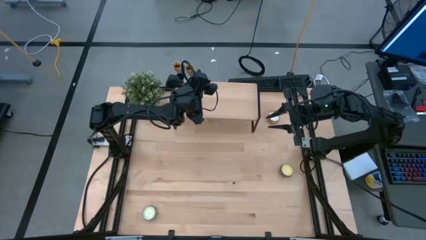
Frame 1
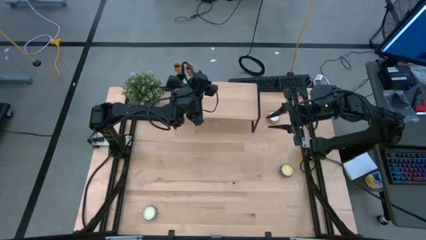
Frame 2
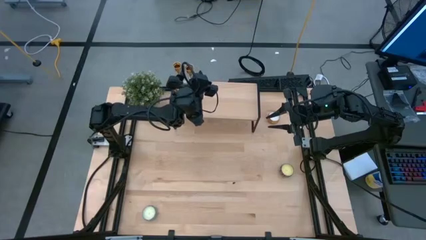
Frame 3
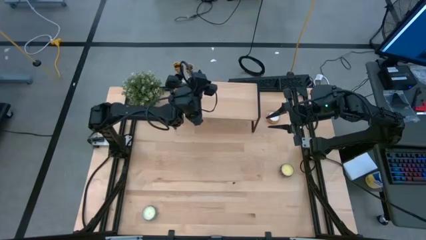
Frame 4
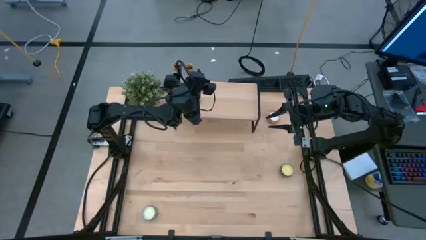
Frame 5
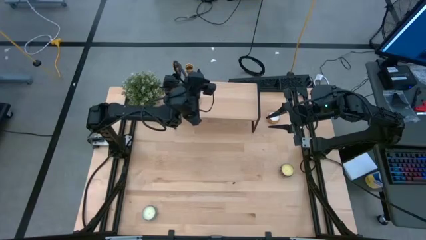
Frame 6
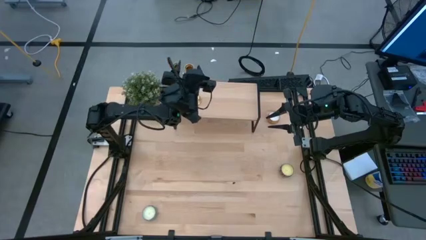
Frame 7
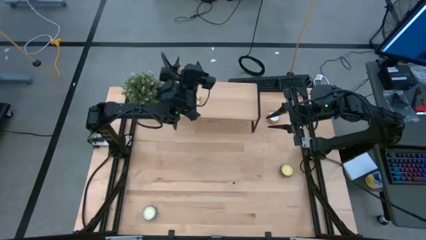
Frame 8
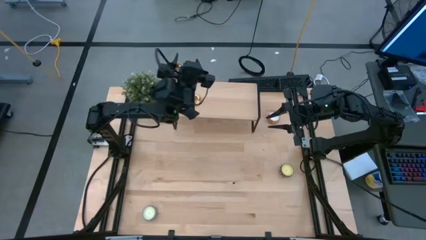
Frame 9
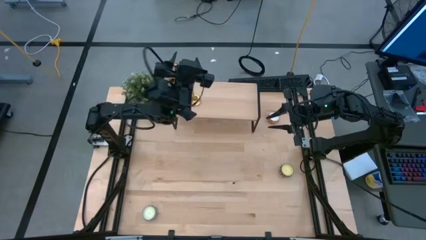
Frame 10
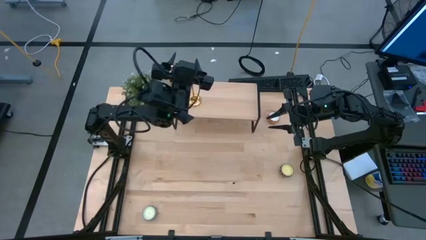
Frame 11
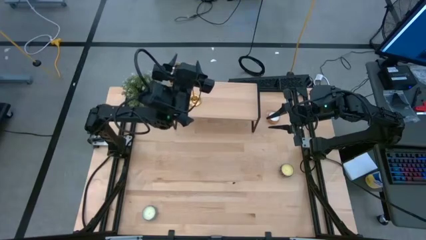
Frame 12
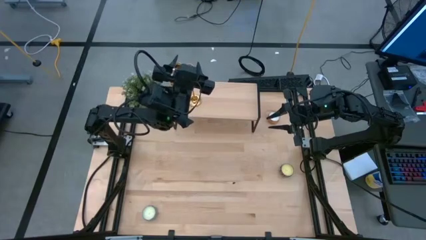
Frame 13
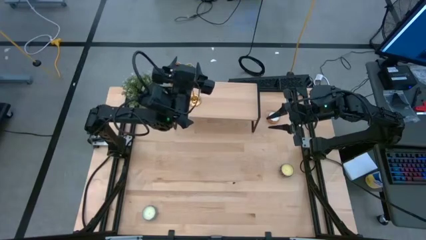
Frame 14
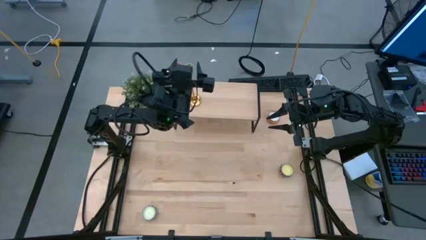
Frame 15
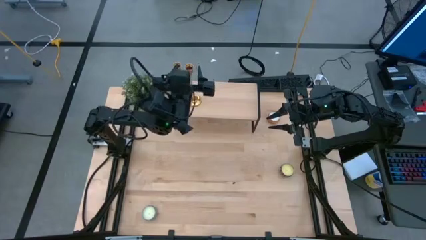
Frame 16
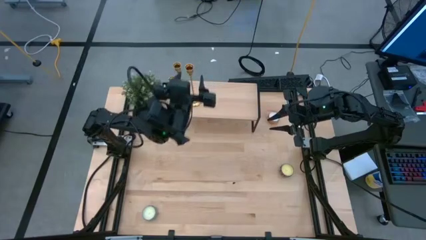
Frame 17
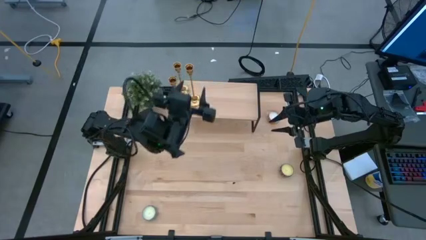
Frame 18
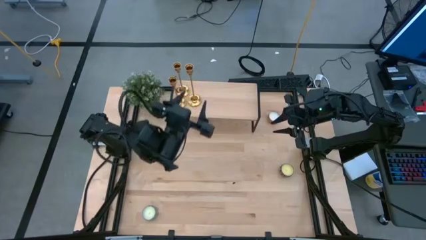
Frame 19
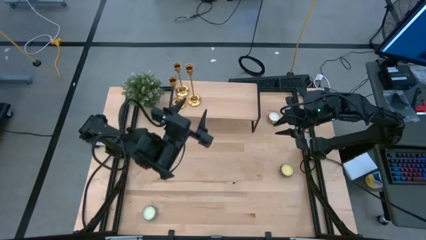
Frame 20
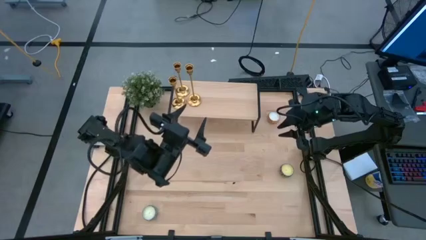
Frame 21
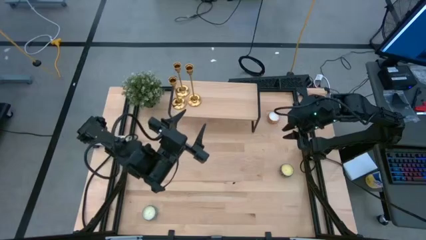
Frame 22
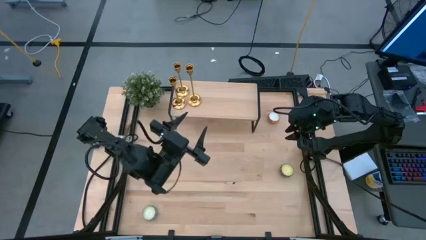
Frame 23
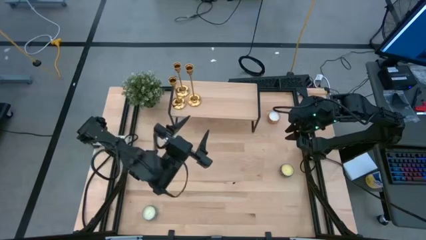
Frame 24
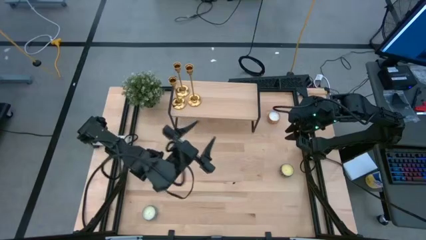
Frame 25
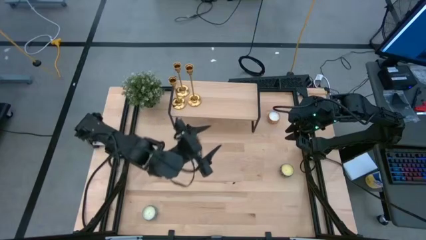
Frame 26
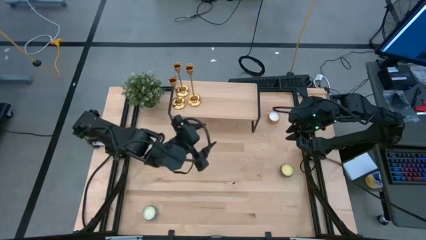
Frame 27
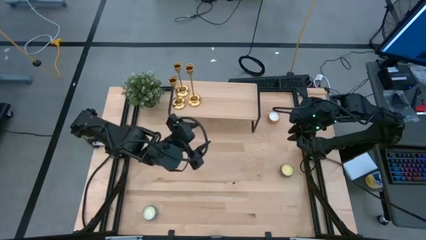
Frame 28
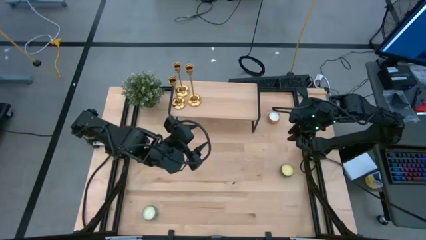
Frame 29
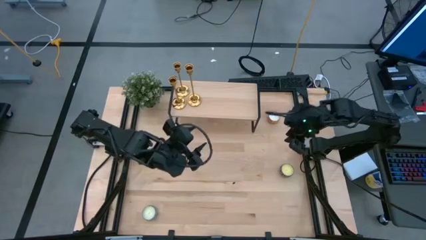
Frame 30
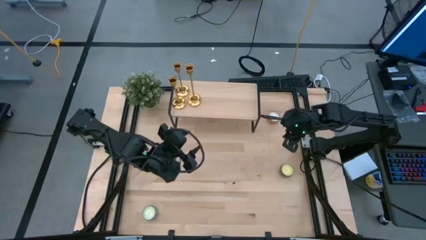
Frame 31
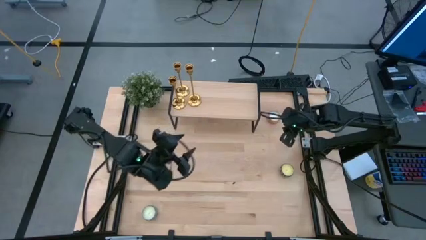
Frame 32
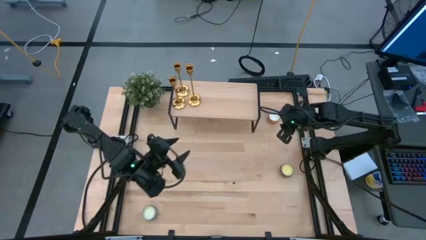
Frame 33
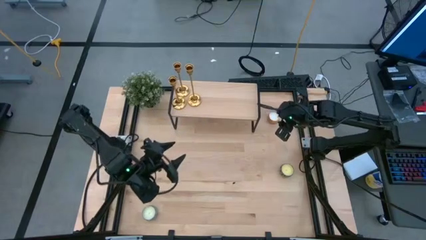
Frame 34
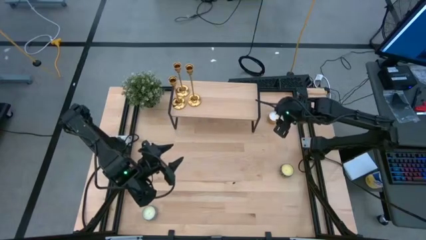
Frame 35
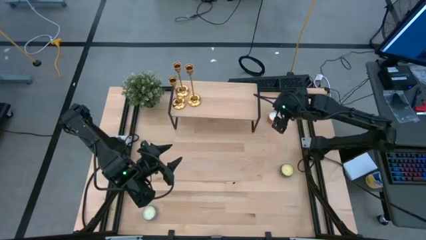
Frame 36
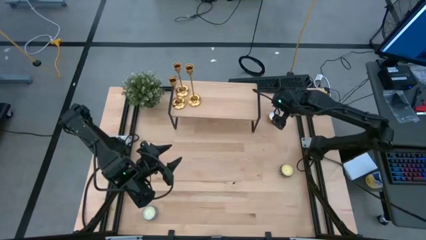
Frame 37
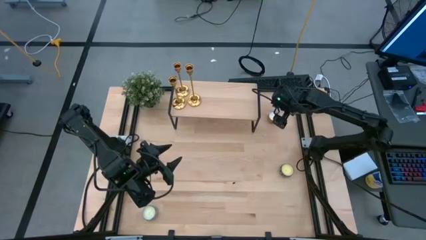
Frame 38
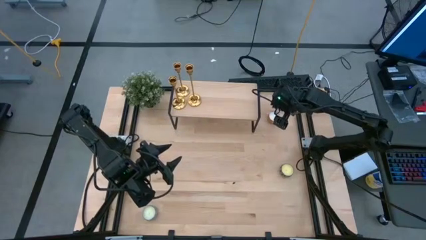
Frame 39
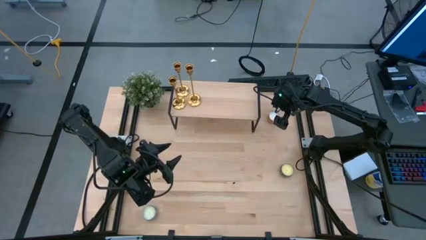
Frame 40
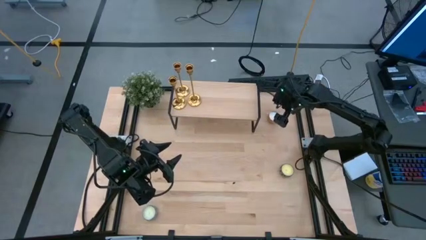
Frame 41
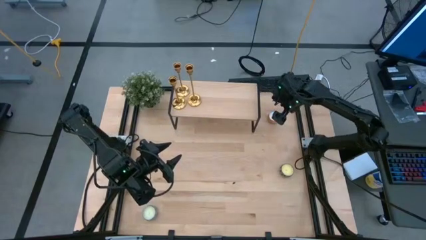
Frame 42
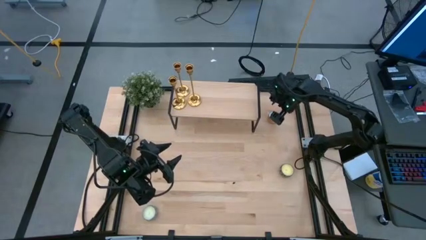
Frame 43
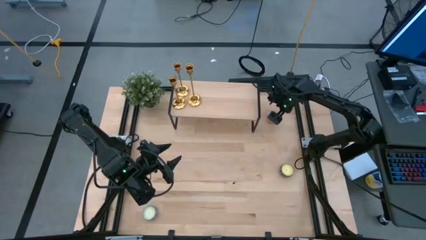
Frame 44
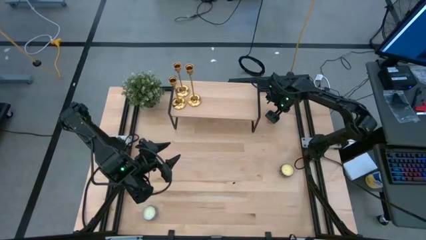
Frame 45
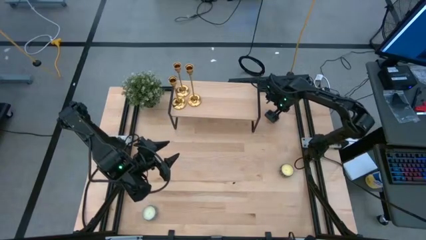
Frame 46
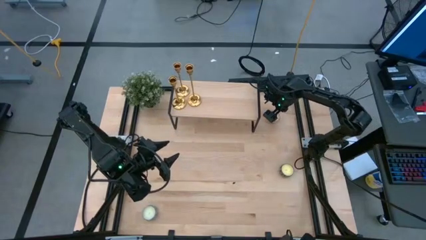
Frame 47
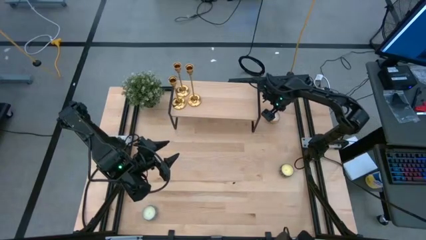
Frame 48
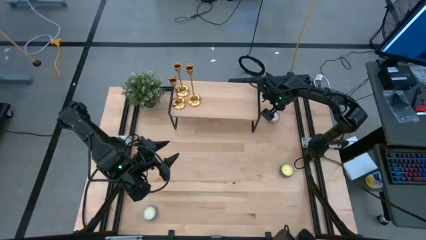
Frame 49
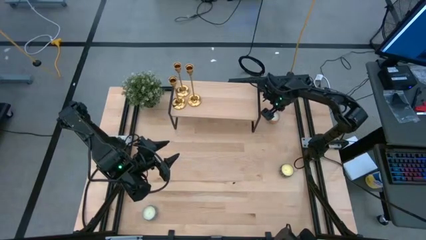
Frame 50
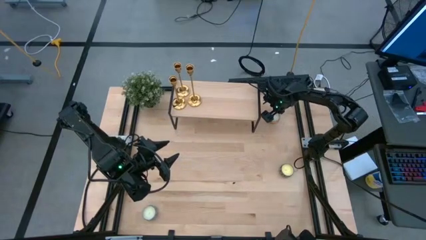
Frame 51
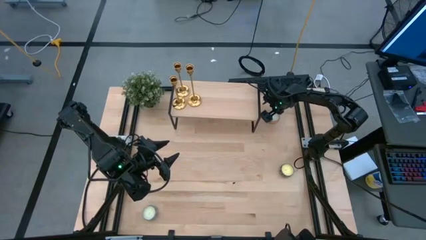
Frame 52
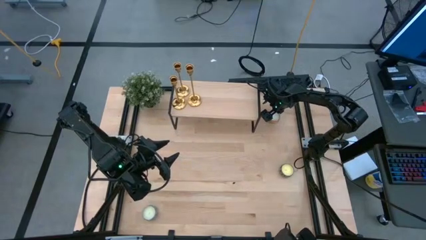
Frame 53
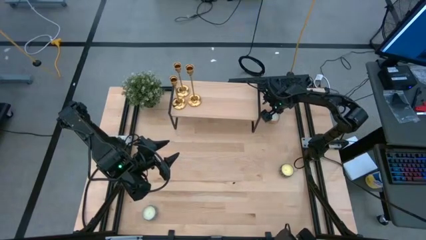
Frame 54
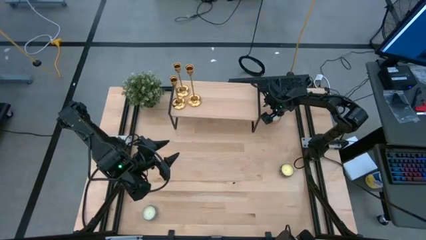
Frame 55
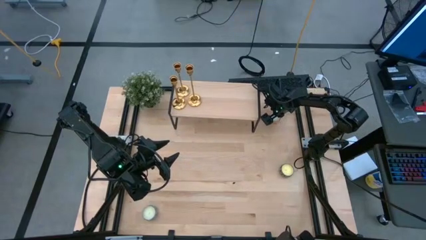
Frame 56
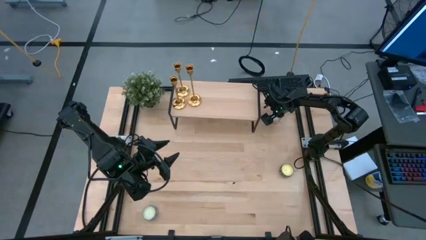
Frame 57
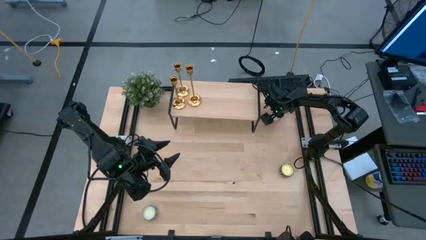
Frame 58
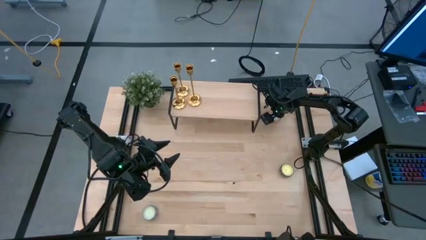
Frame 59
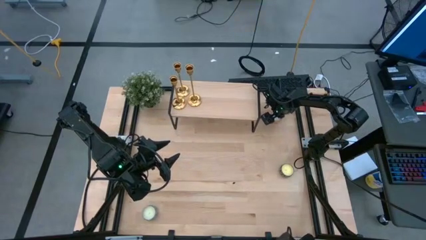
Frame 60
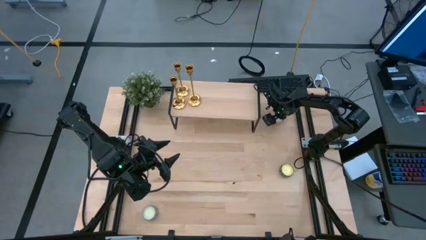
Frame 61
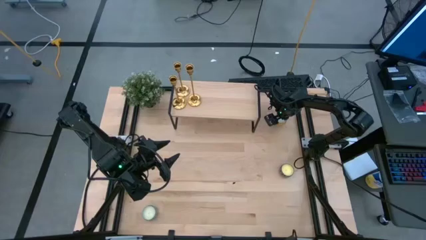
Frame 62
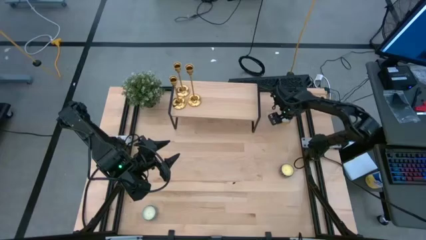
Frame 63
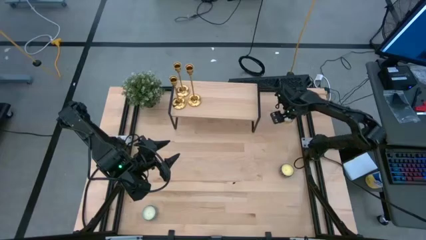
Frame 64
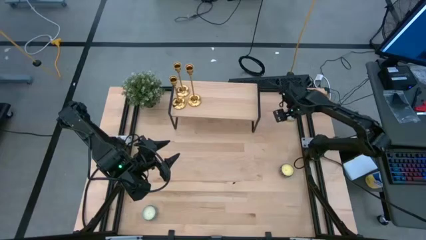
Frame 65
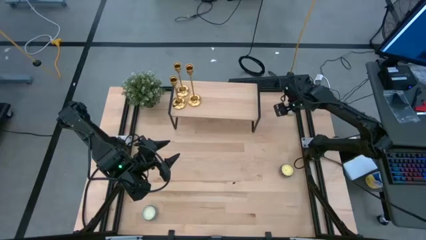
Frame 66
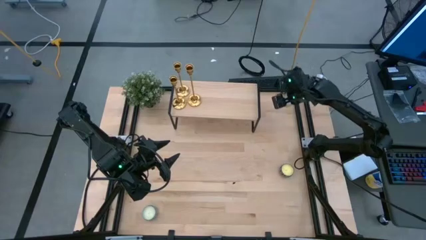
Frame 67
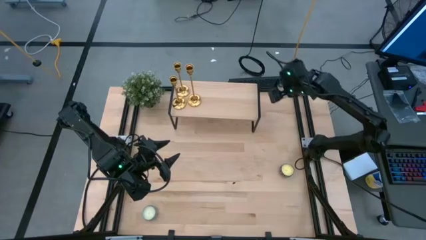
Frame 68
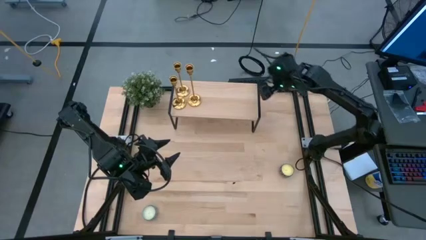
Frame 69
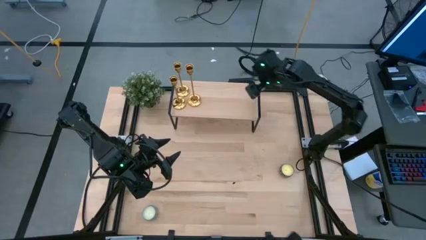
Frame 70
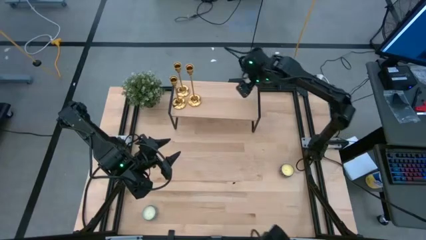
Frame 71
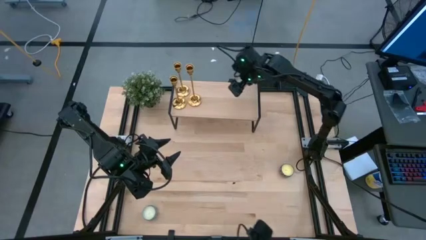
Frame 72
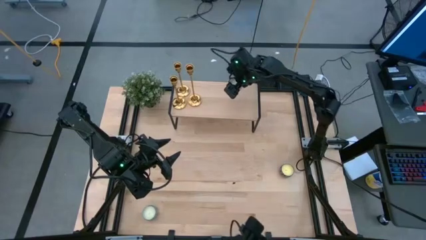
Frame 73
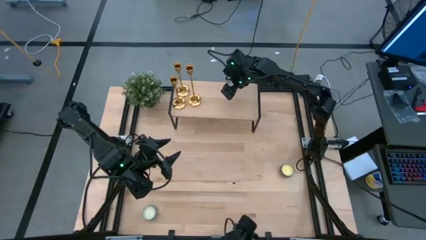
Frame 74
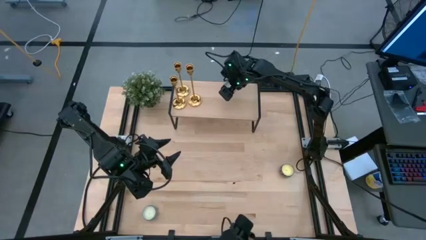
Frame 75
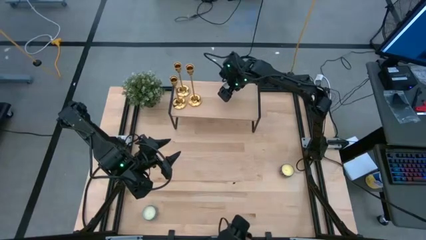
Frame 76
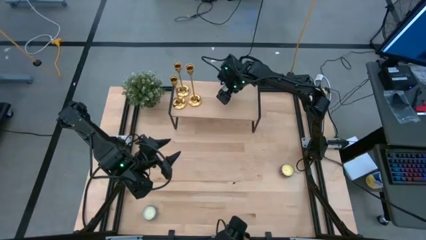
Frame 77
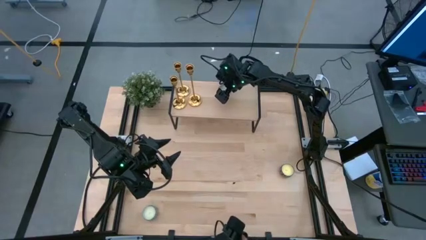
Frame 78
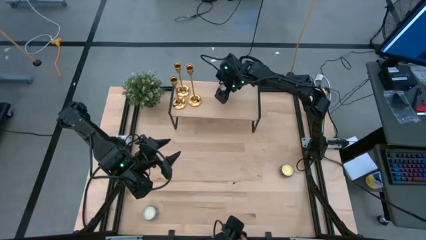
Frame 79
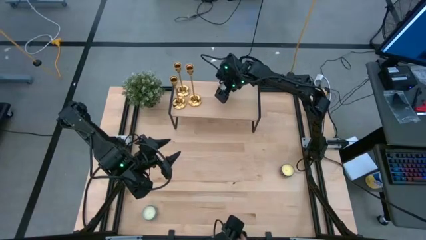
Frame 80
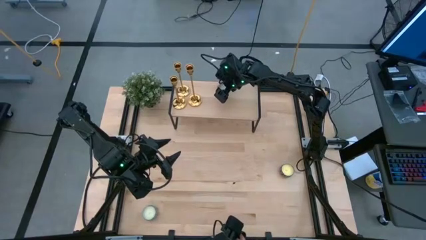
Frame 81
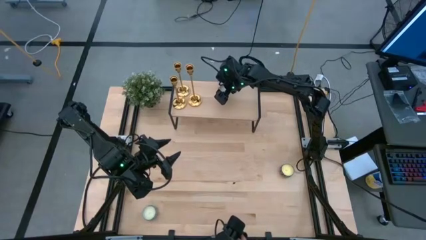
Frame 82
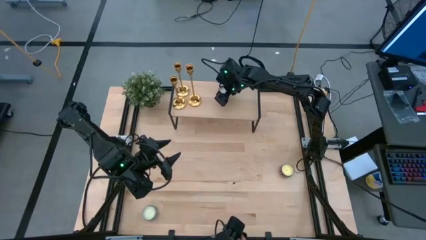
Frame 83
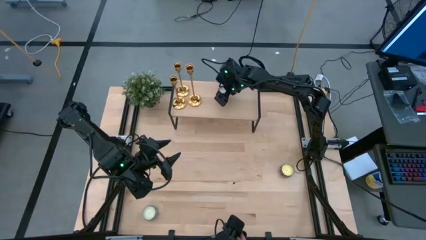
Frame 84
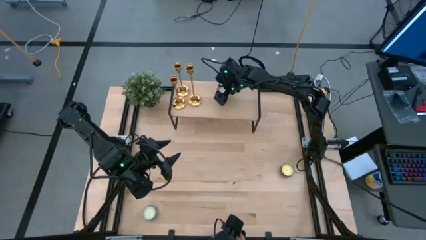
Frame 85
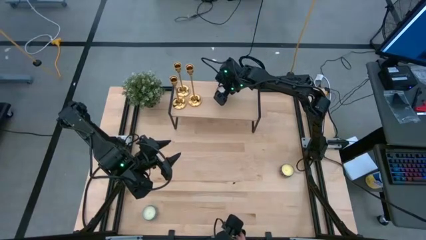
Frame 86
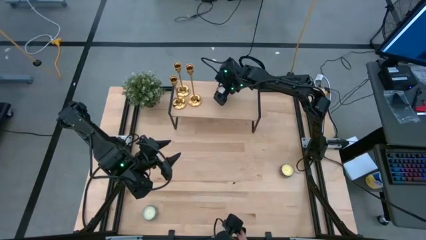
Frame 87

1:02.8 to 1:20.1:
Task: Pick & Place candle stick holders
Put the orange scented candle on the shelf
